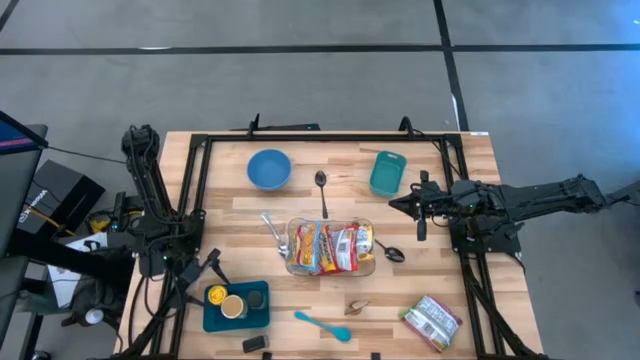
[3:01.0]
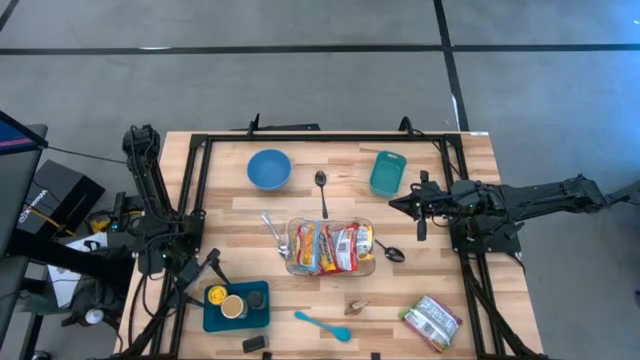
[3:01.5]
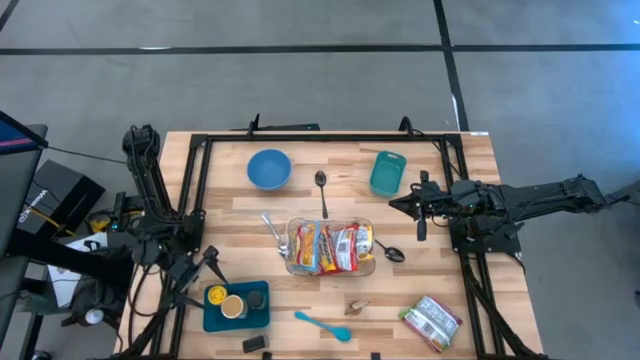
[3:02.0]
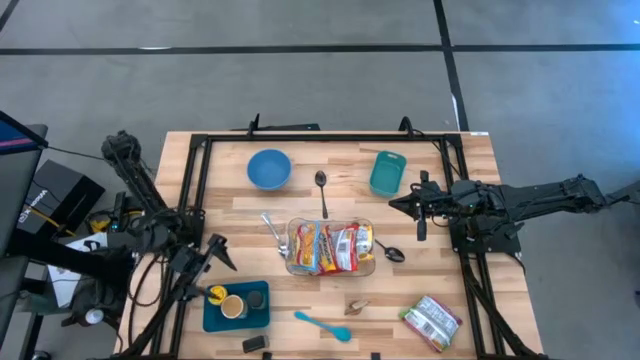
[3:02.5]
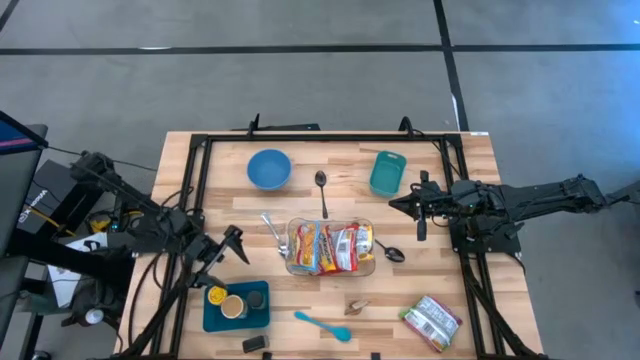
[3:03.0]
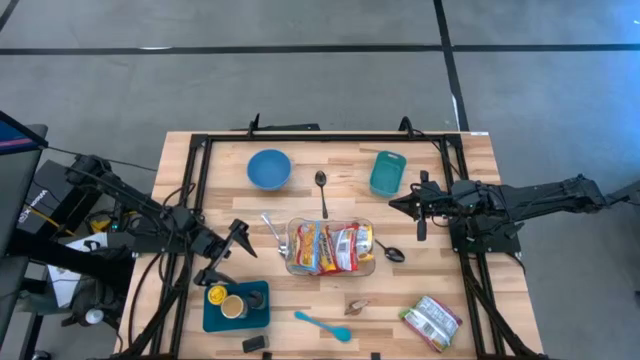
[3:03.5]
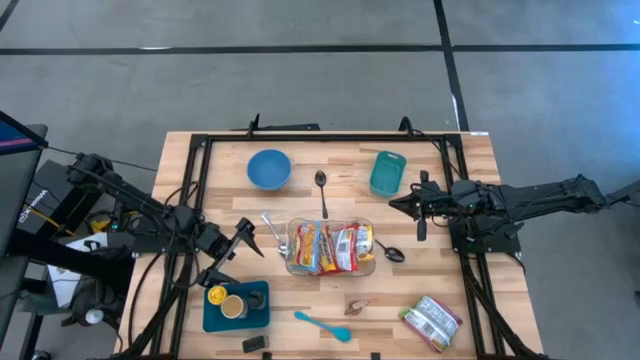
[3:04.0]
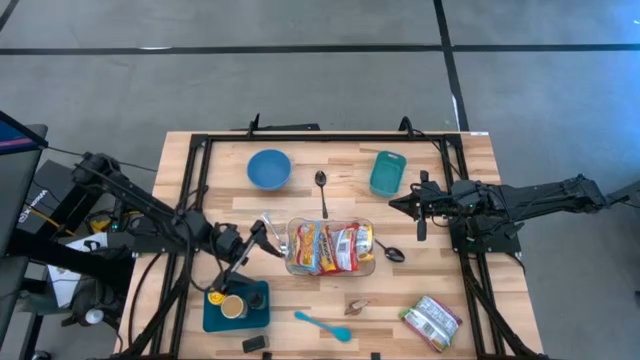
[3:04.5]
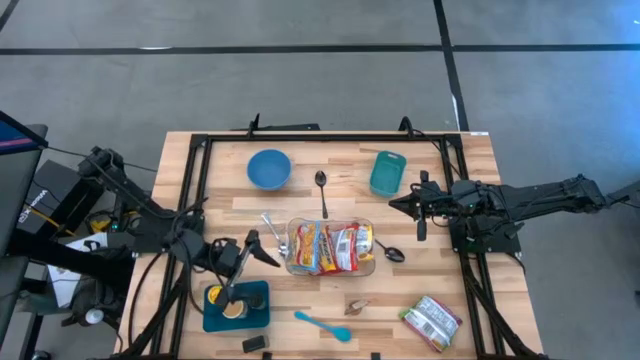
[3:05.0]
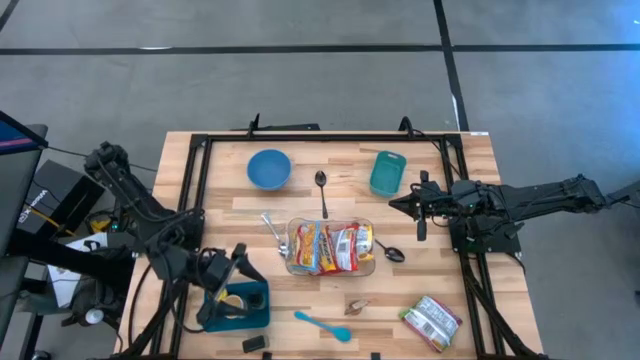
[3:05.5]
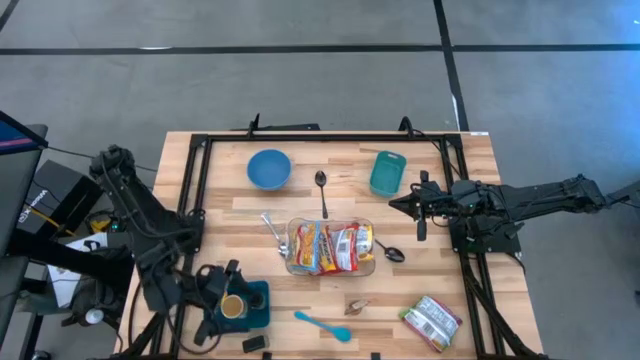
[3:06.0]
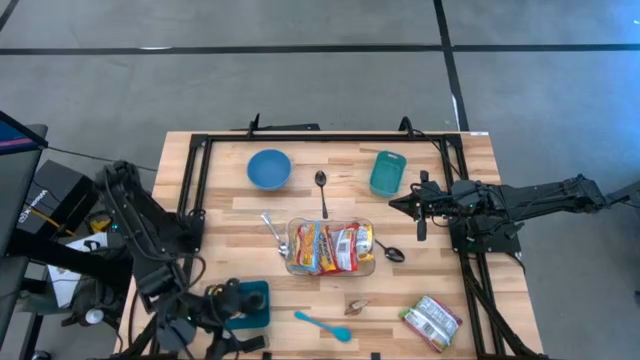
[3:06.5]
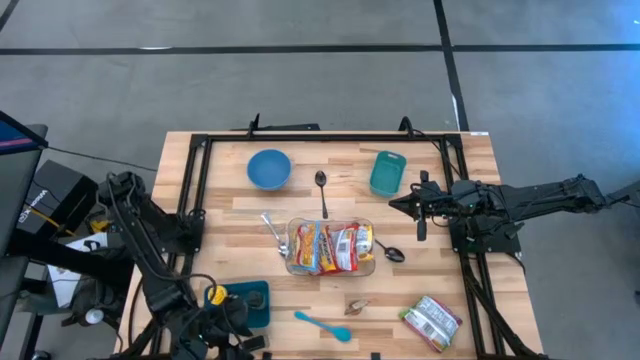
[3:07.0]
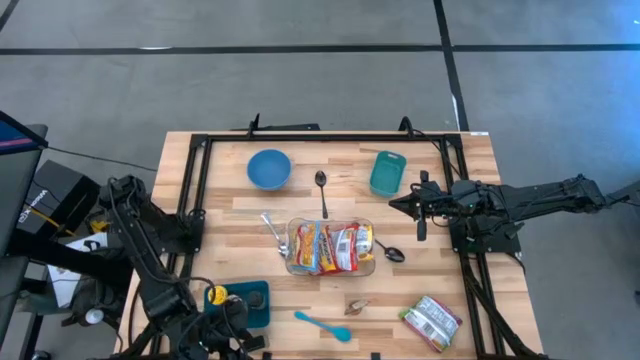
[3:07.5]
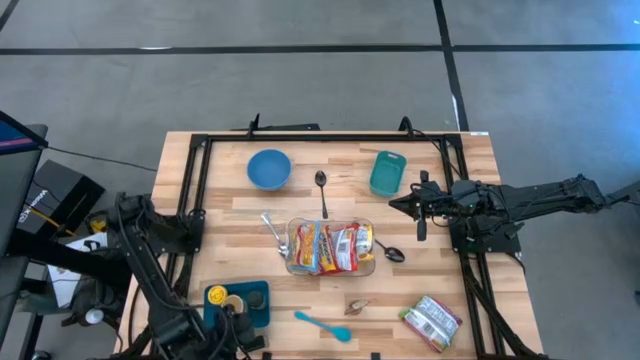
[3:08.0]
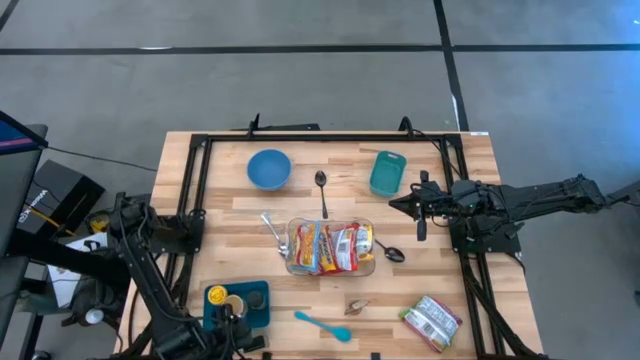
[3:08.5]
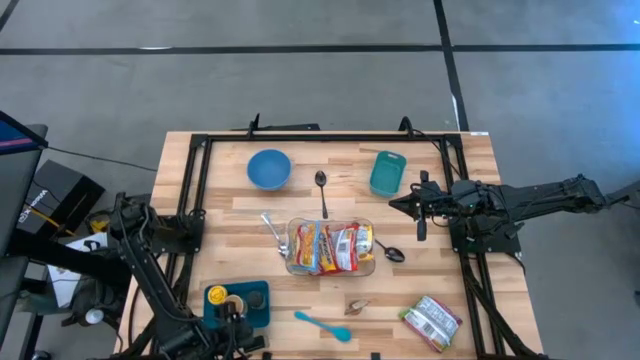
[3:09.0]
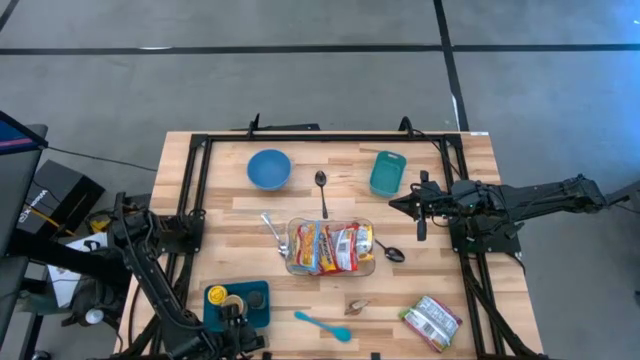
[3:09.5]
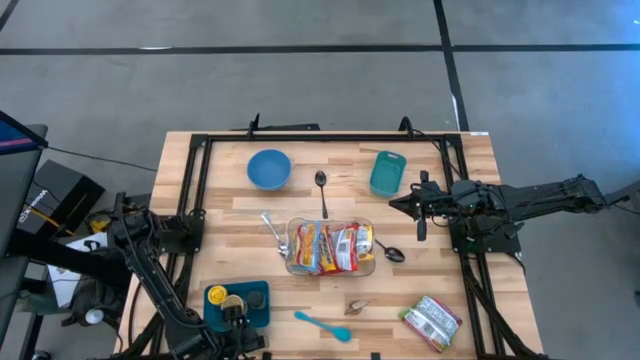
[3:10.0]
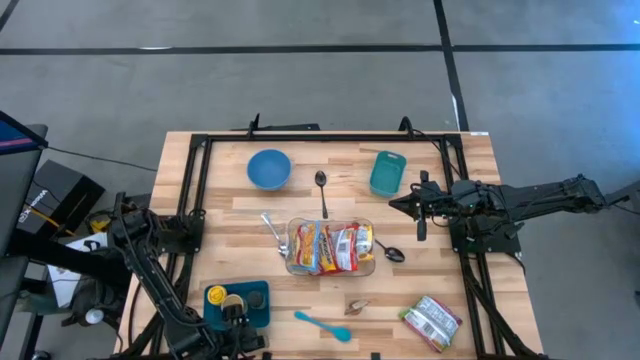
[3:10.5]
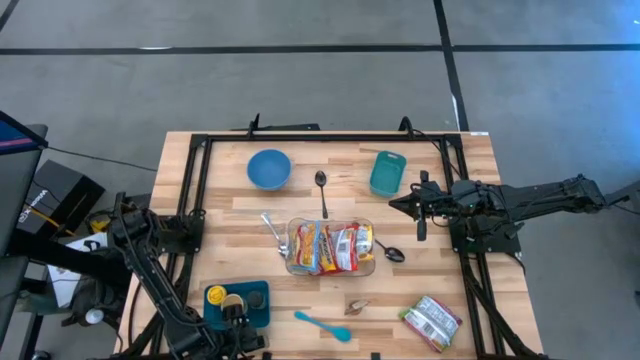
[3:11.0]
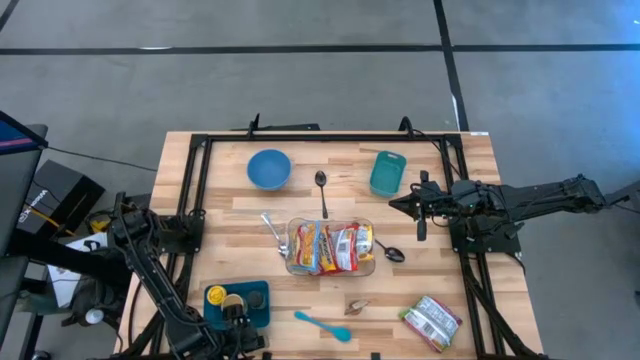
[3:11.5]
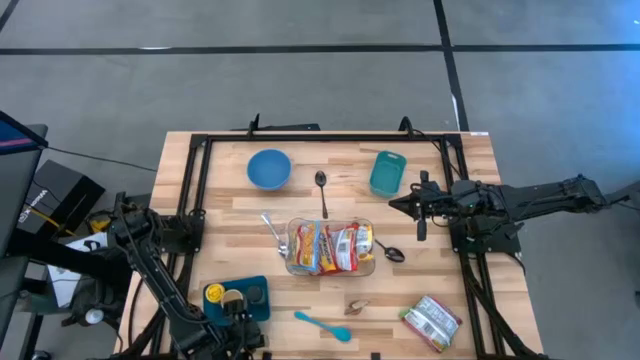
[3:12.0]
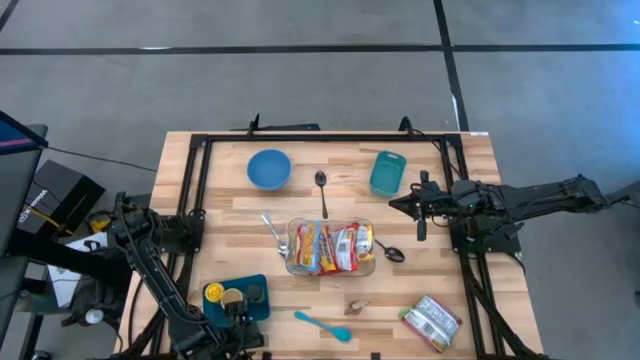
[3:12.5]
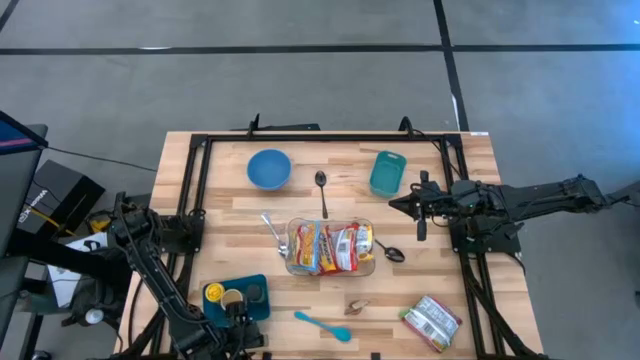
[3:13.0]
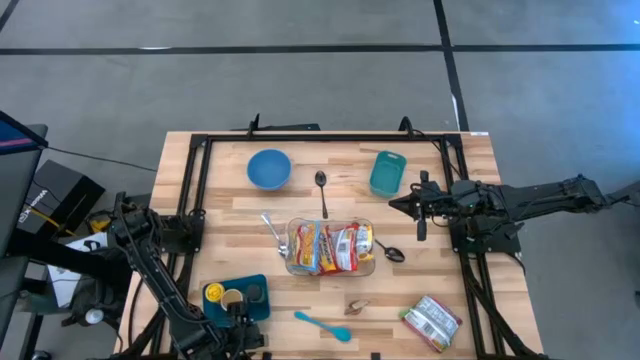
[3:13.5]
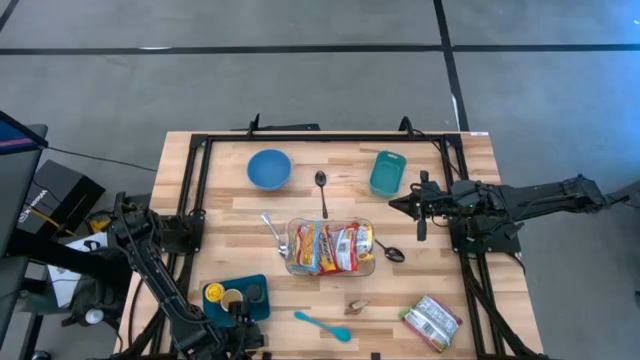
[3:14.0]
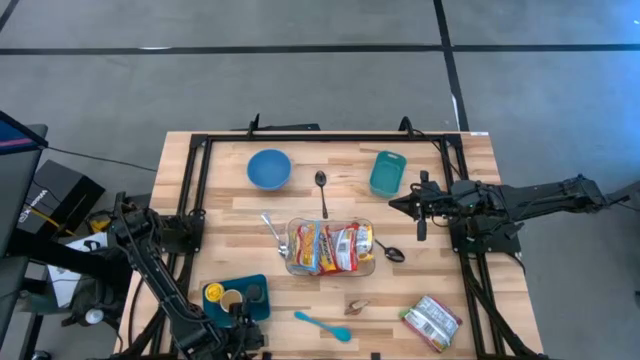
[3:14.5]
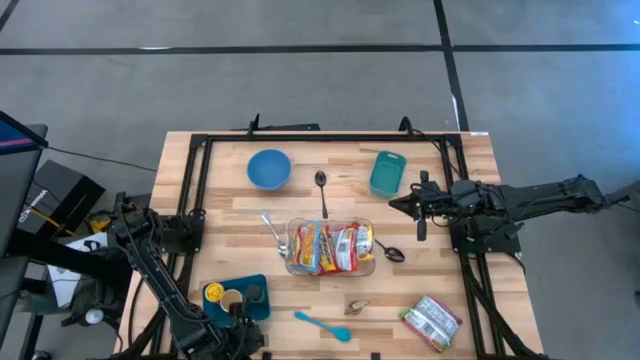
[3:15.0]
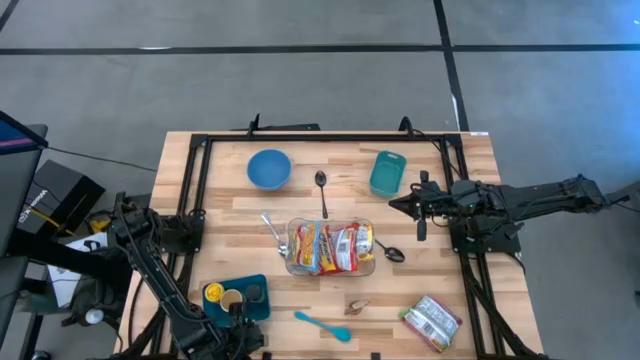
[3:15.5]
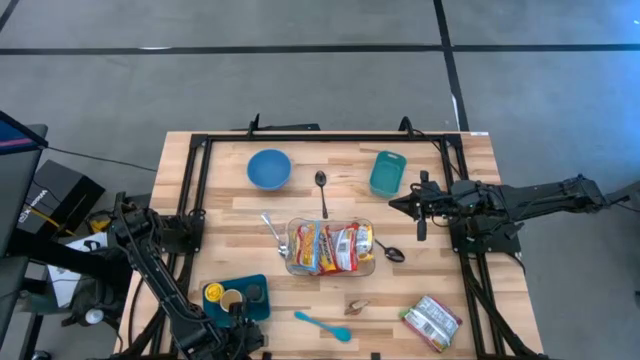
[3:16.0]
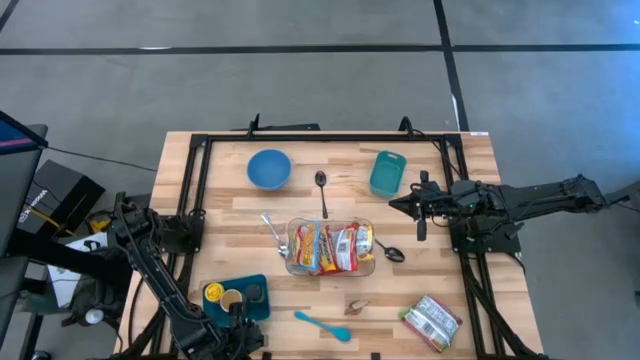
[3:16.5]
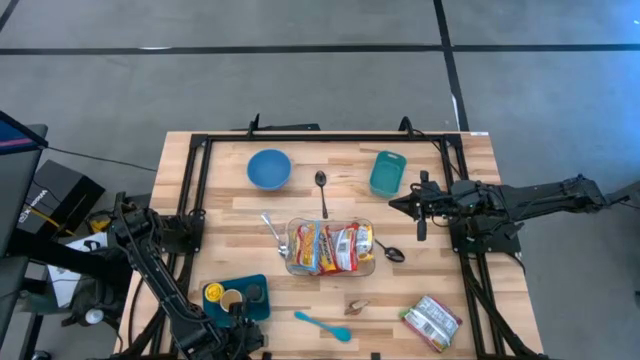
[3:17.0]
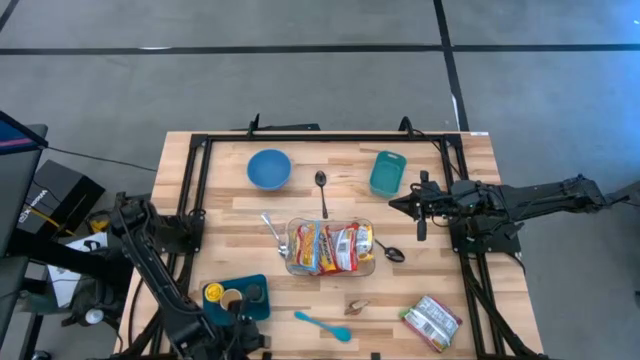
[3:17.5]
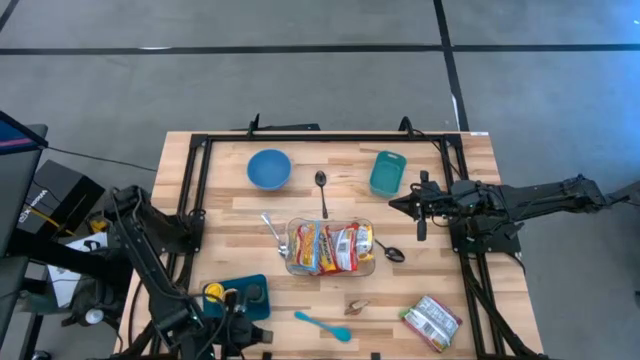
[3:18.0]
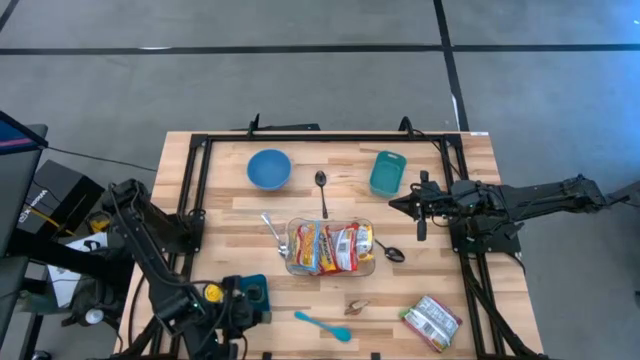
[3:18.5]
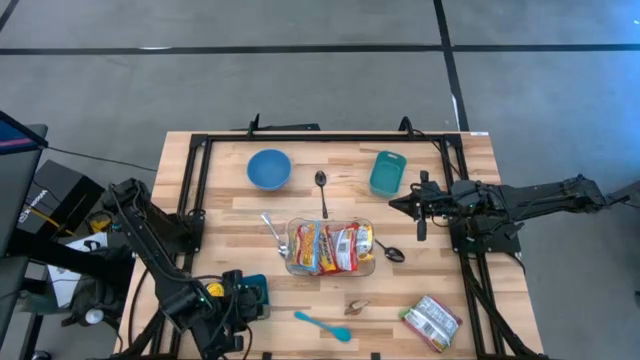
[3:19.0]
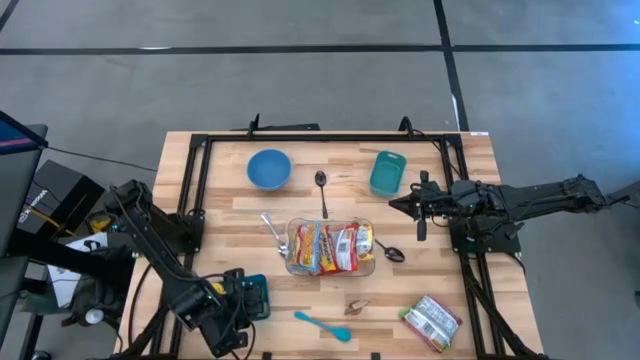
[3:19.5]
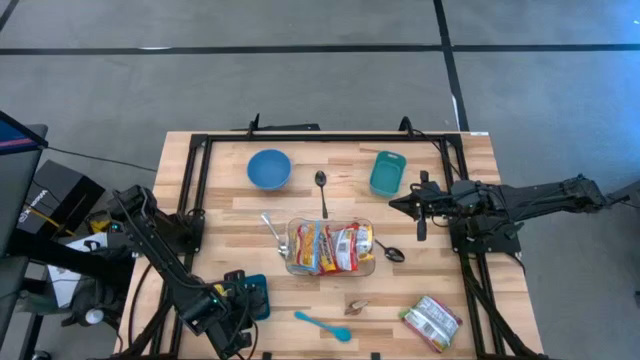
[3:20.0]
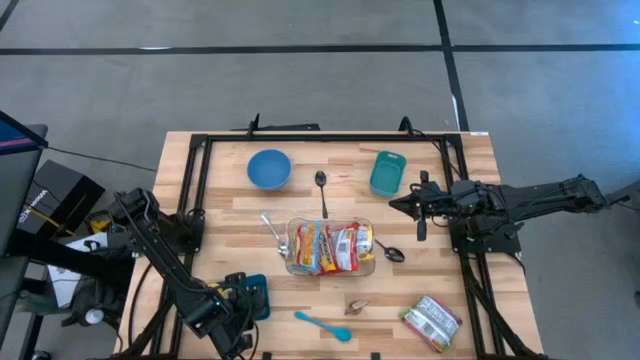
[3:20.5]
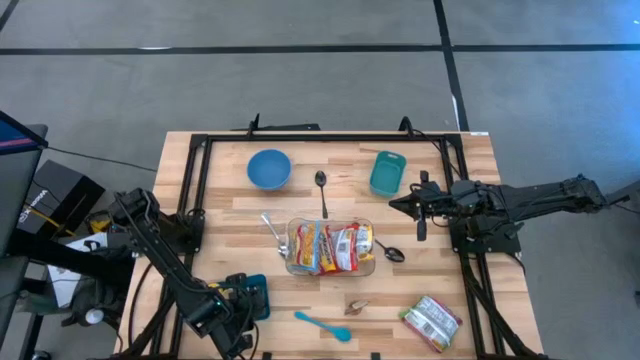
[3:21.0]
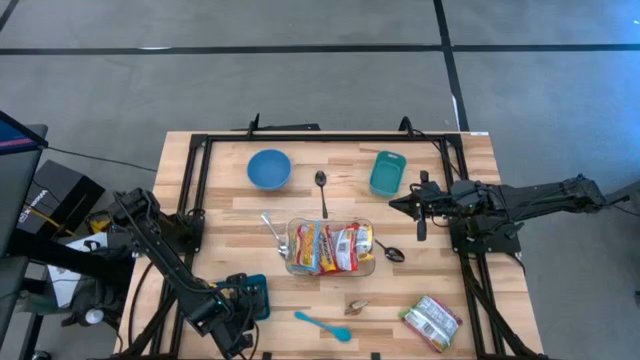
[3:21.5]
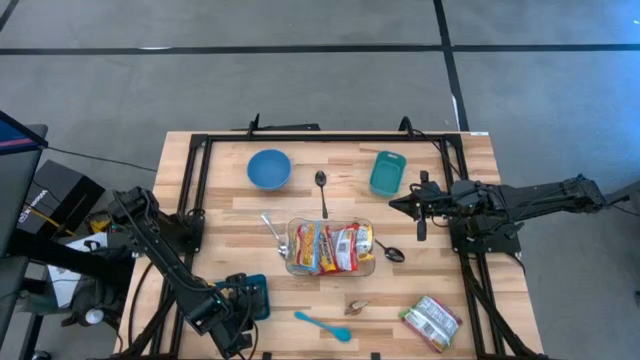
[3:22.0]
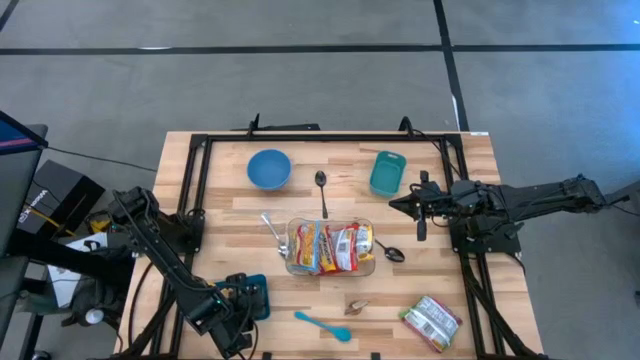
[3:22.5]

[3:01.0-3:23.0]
Task: Pick & Place Food Item
Put the black spice can into the dark blue bin
